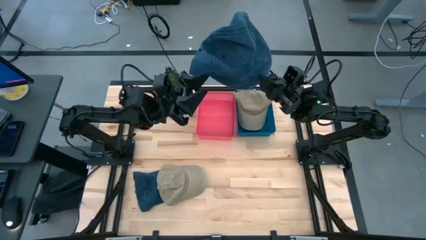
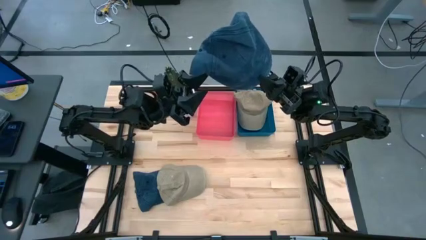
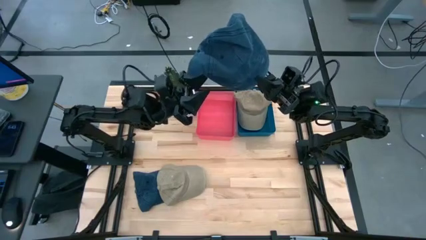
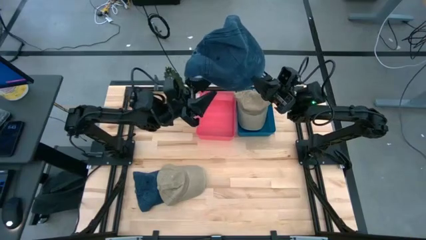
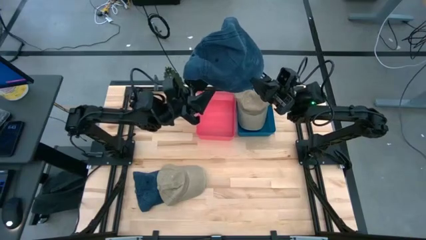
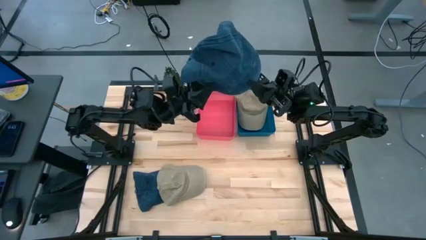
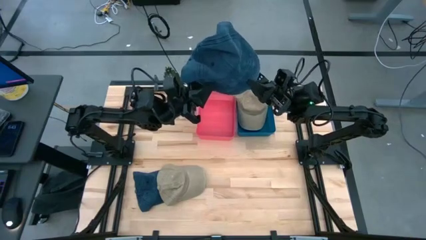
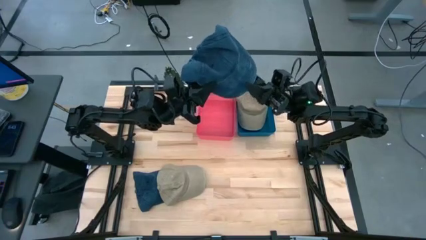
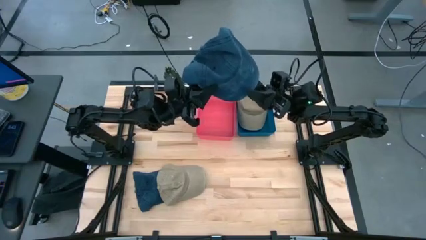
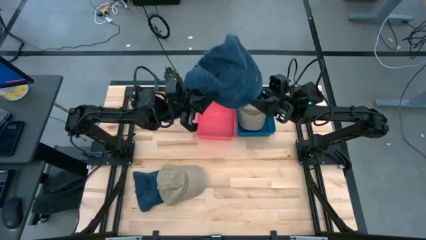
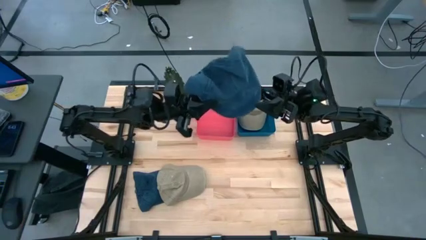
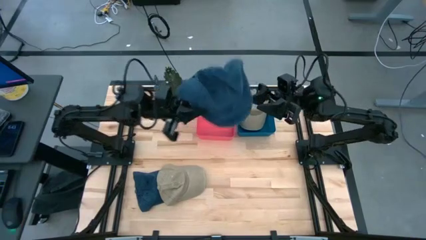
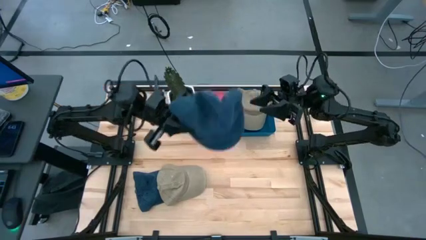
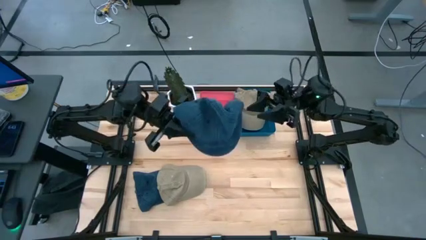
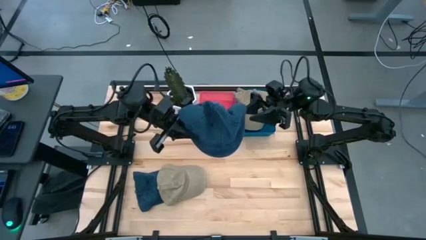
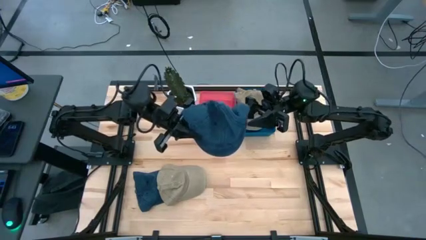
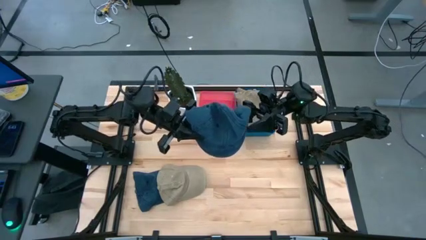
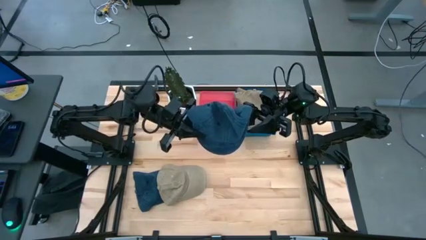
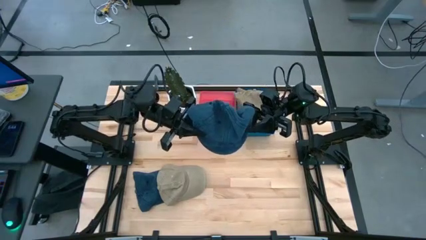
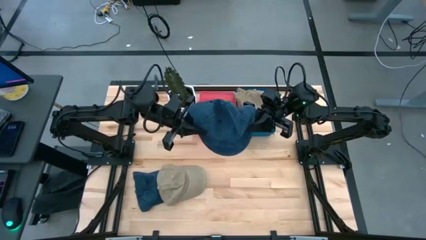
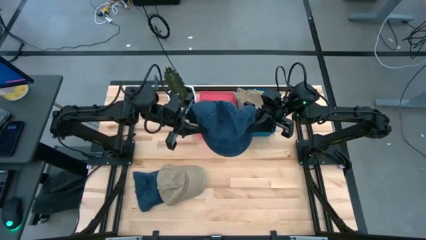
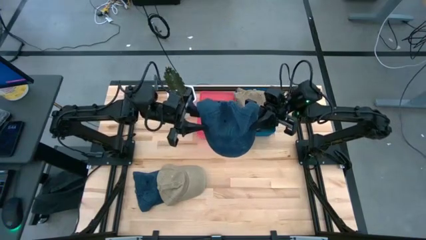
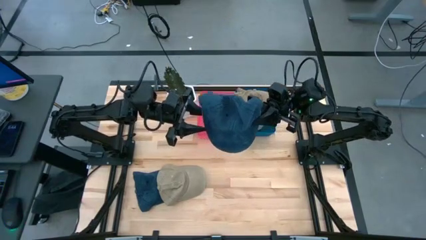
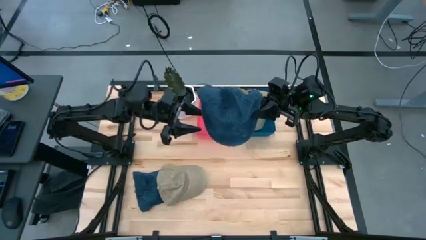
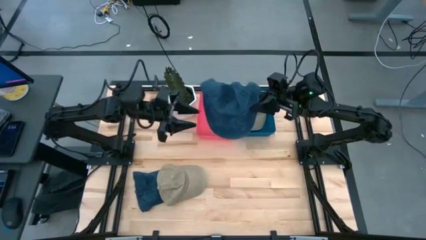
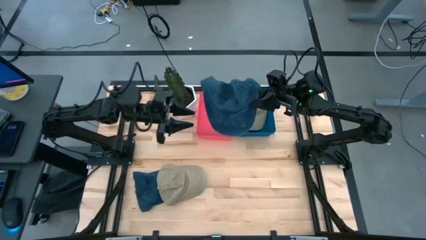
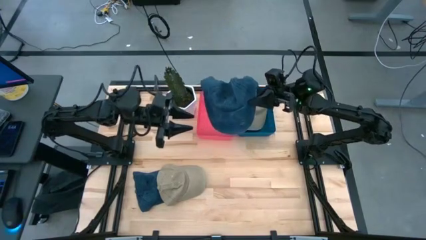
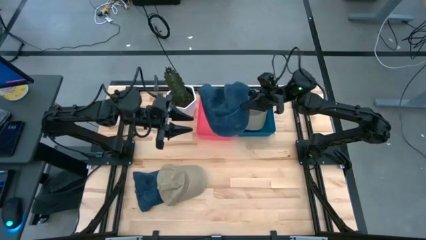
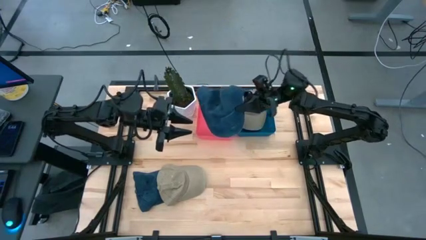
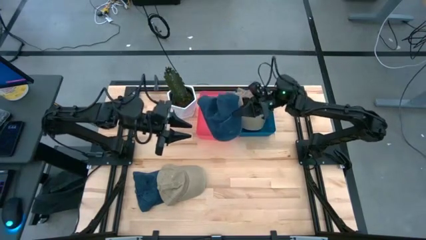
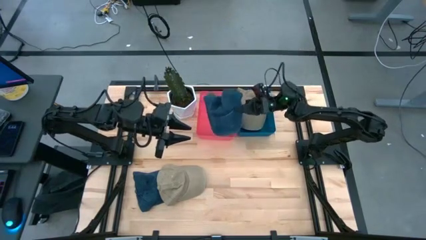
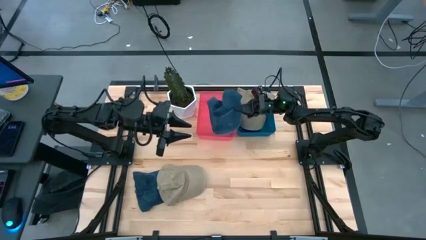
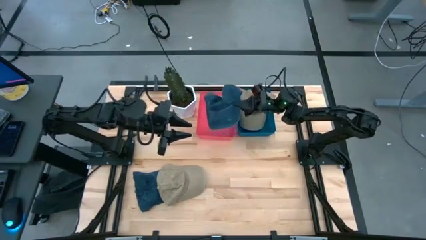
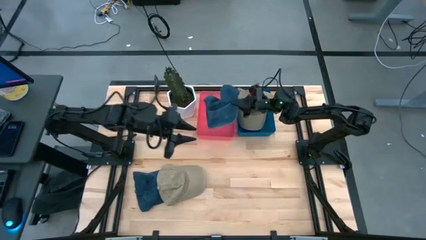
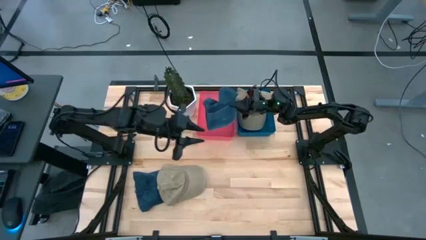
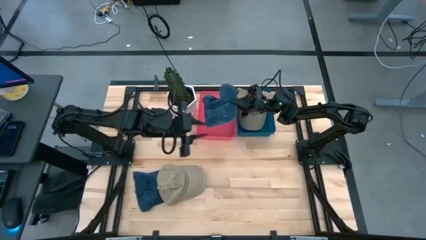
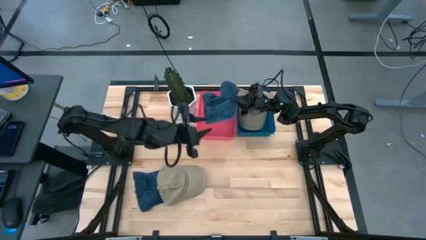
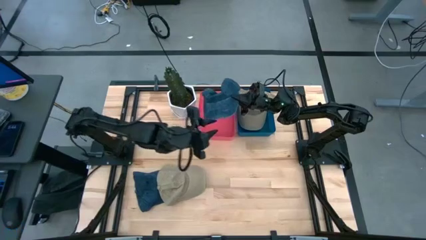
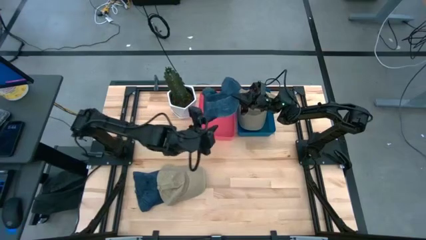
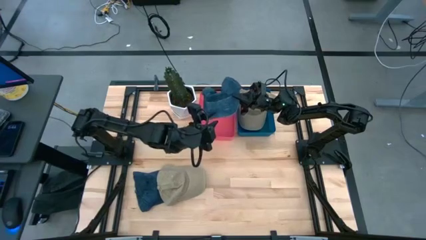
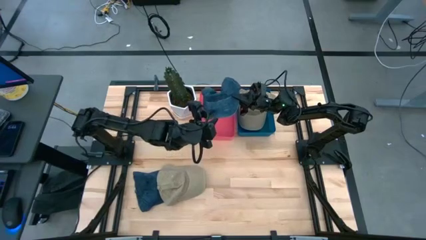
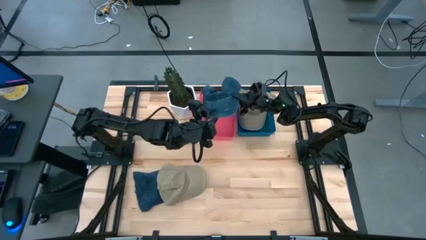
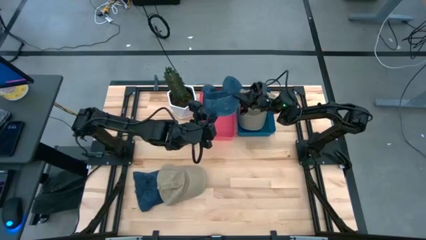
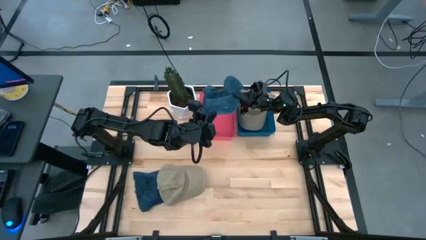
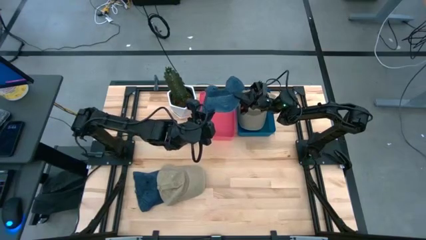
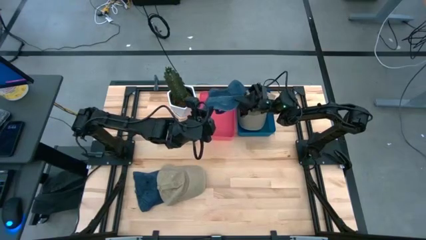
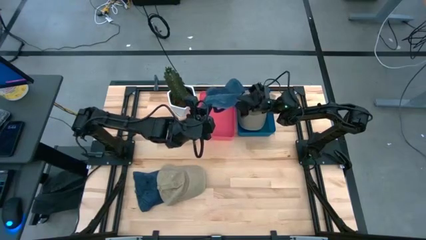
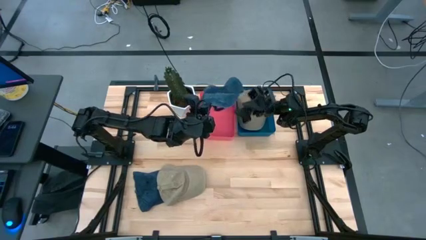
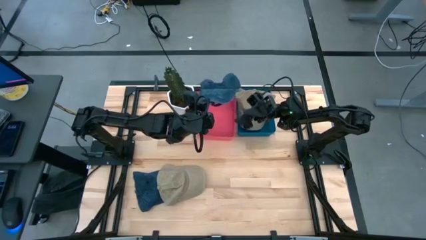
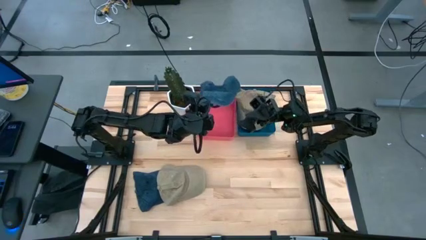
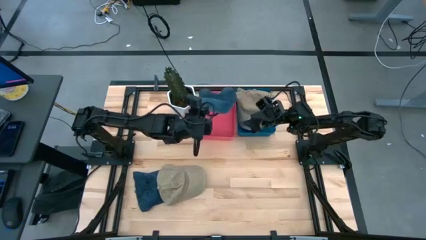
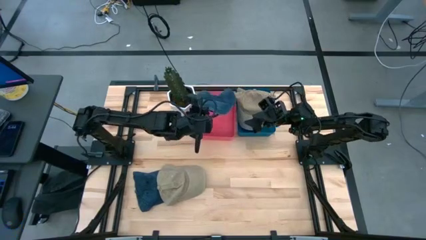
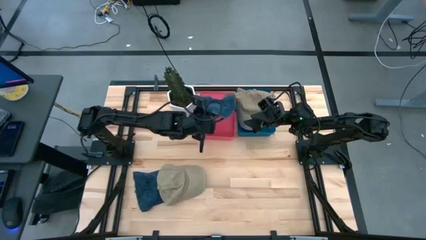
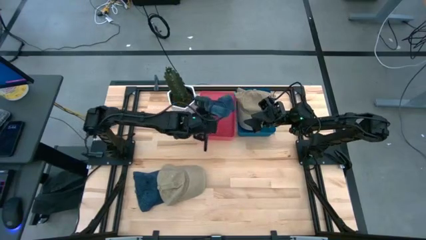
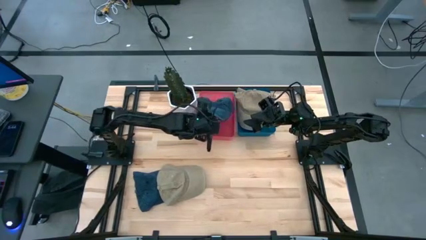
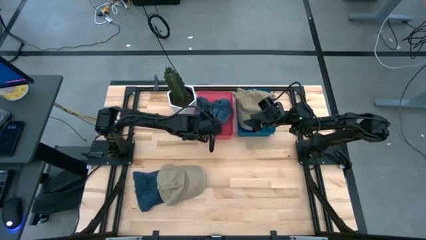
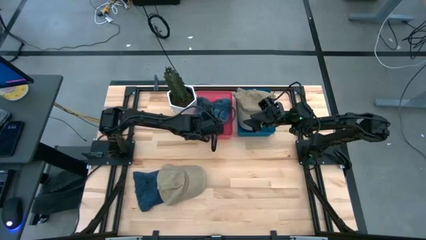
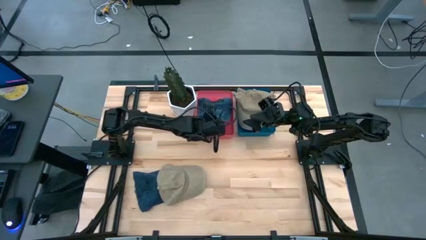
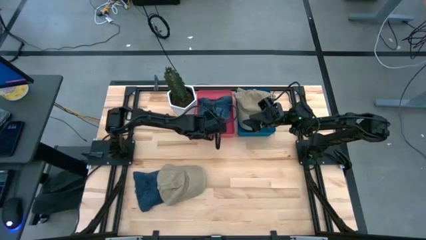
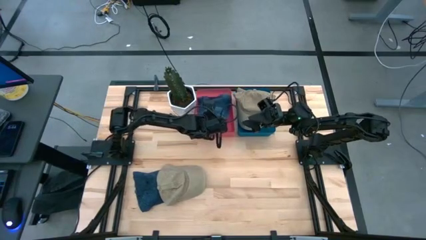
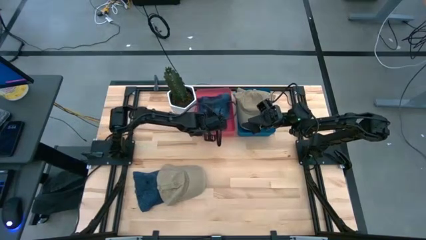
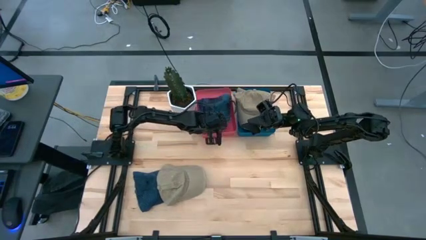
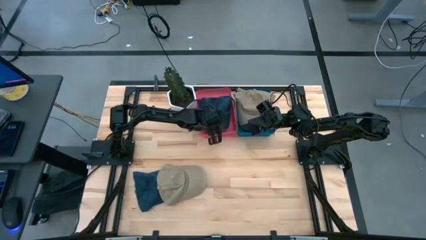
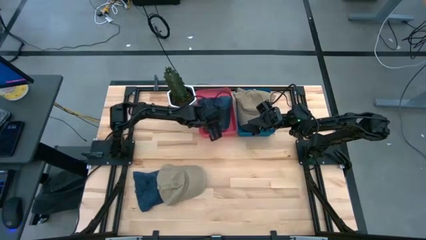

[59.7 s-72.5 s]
Task: Pick & Place hat
Put the right blue cap into the pink bin

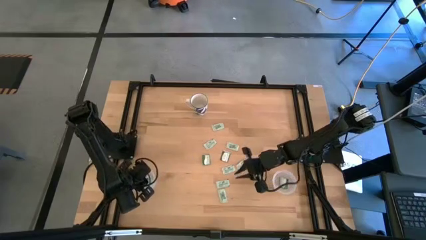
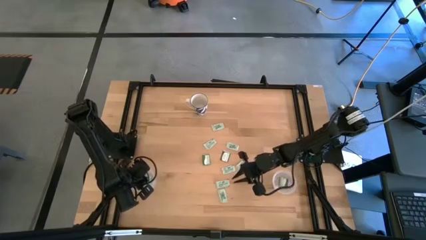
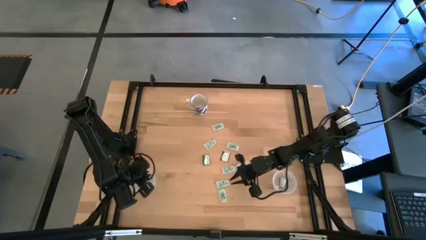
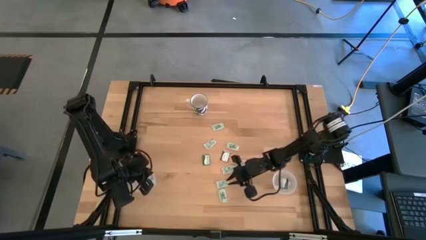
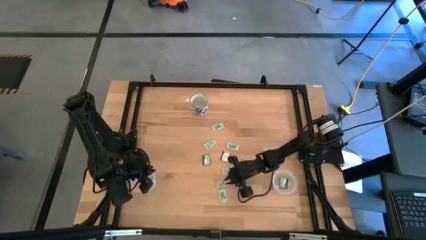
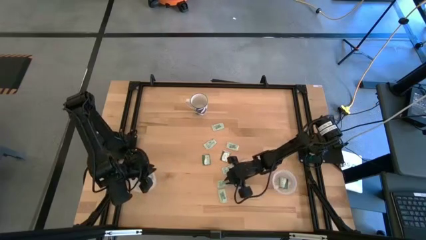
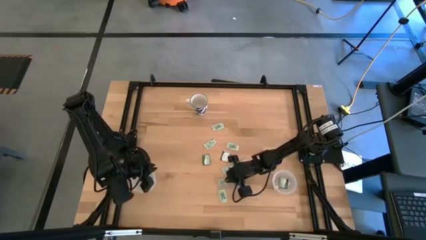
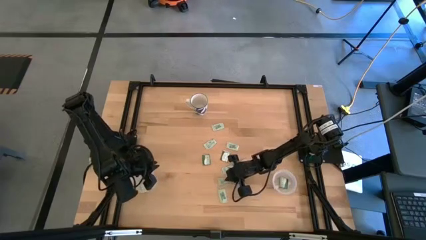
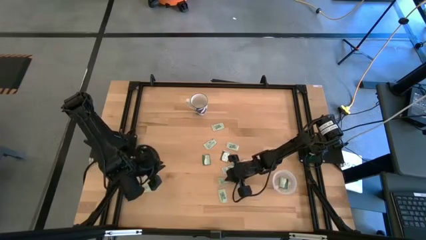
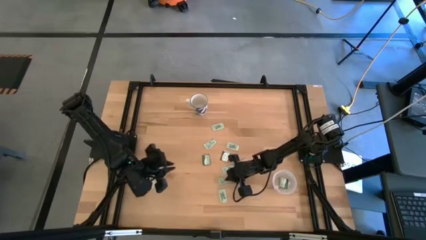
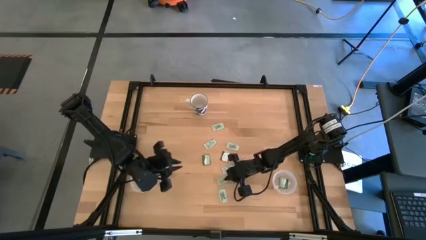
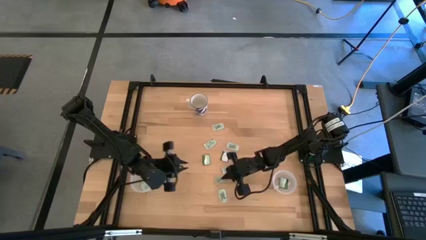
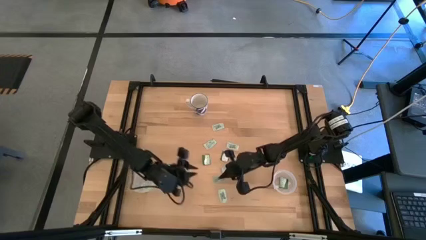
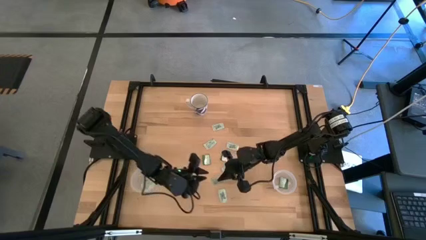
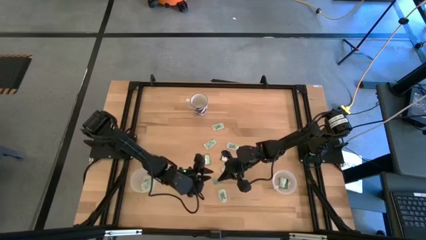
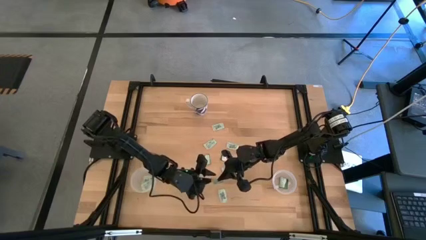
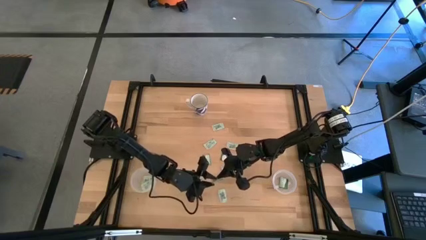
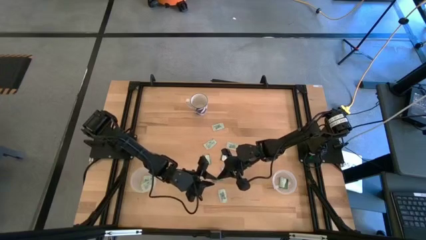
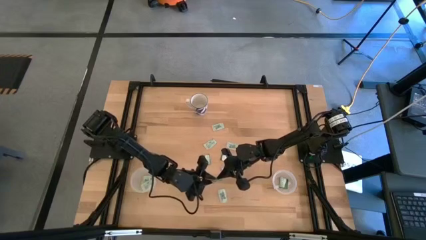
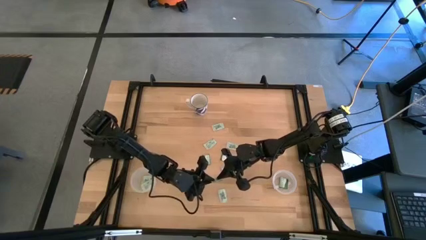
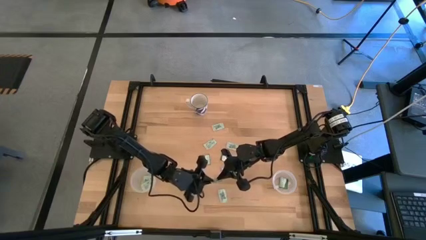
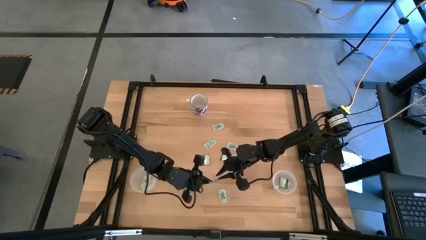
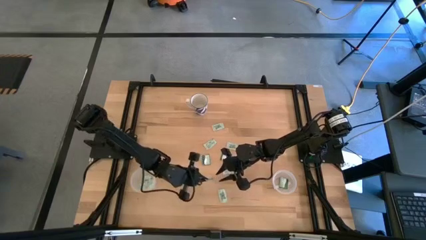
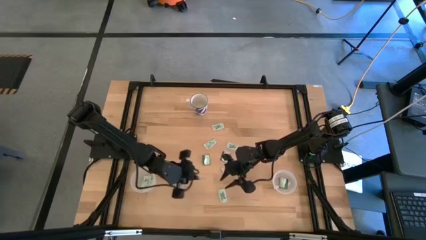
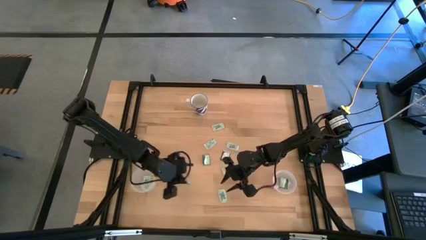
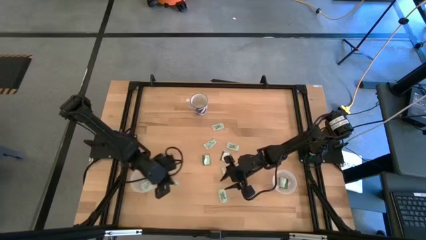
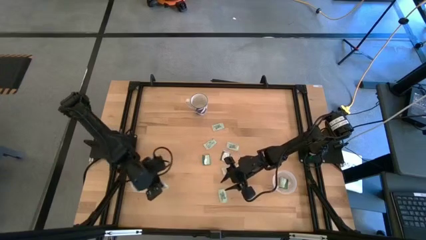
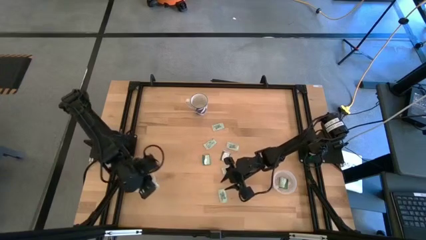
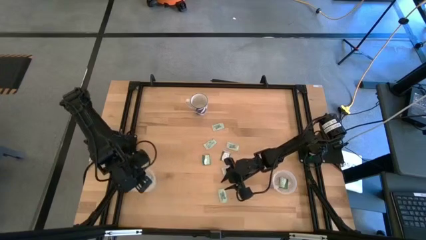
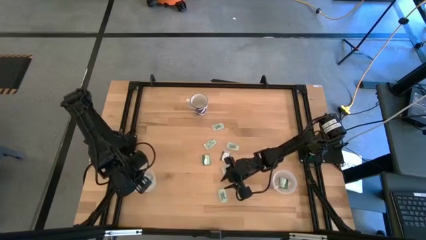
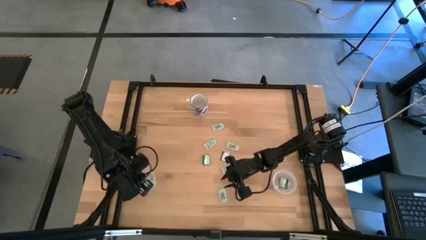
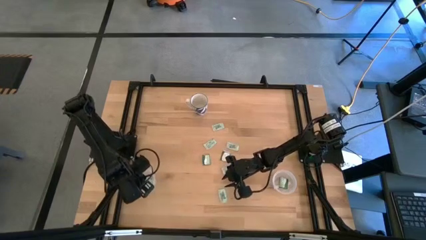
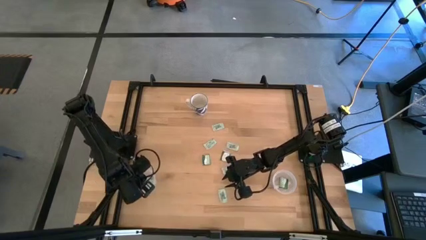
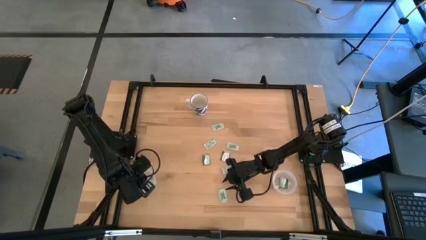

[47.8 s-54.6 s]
Task: Pick and place Stevia / Truvia into bins
Put the light green stevia packet into the left transparent container
